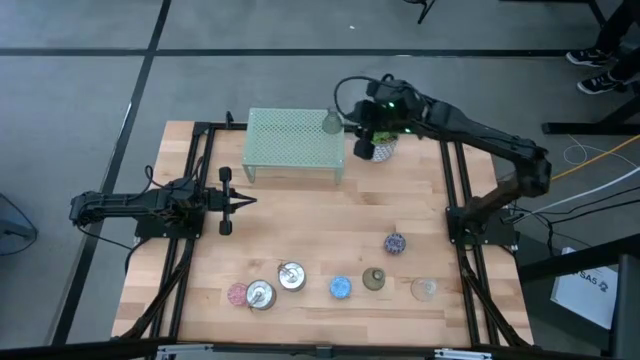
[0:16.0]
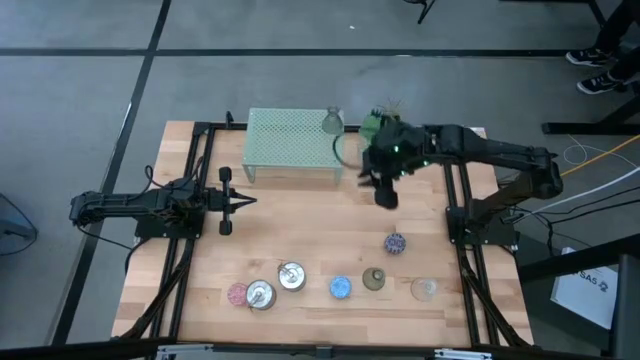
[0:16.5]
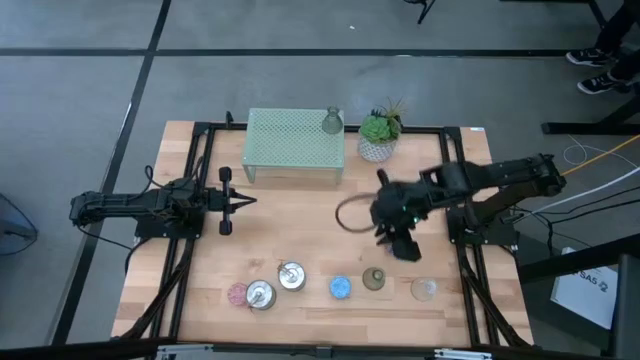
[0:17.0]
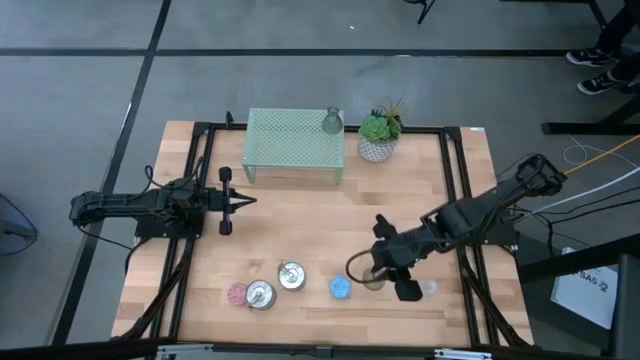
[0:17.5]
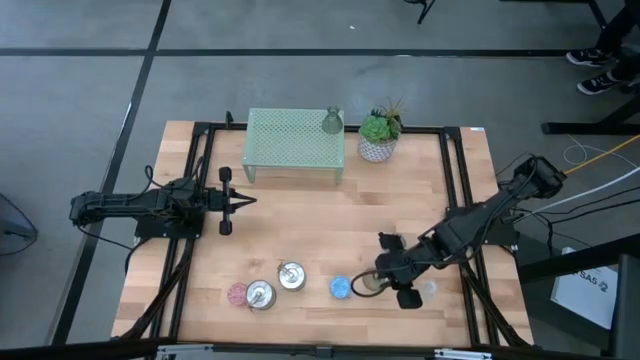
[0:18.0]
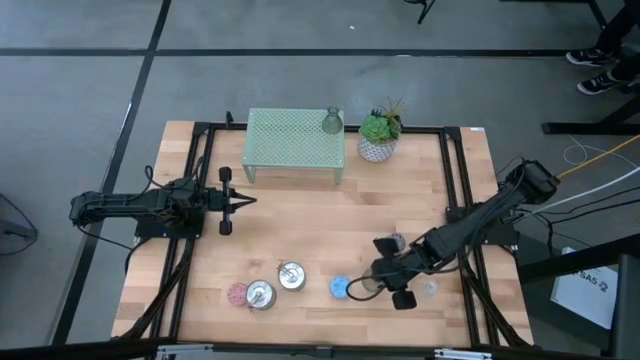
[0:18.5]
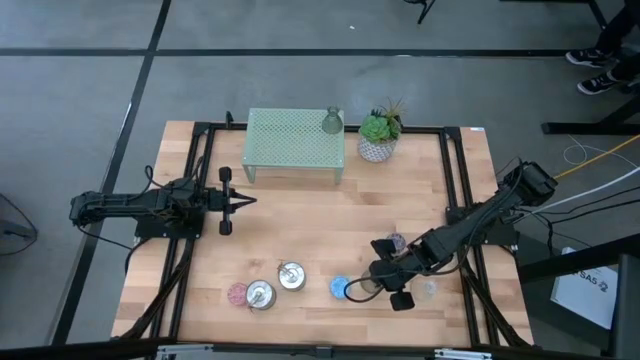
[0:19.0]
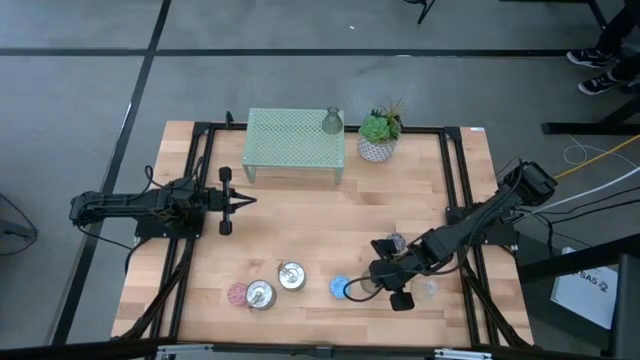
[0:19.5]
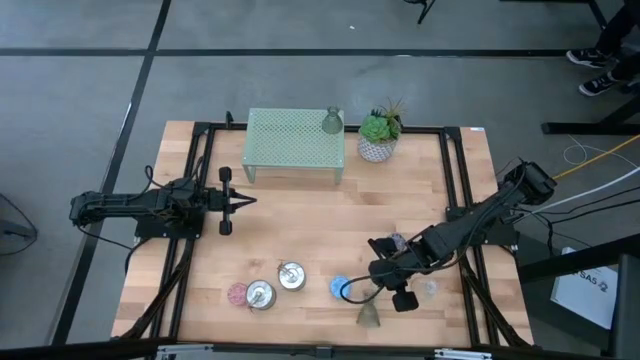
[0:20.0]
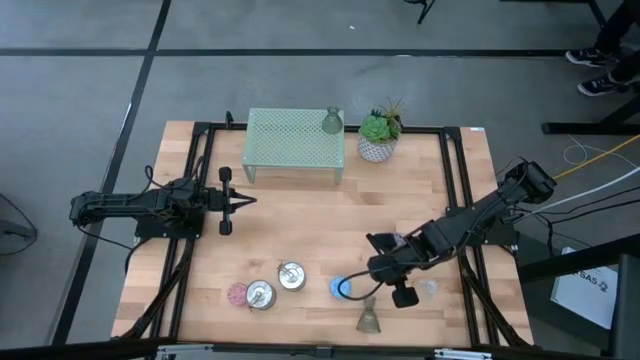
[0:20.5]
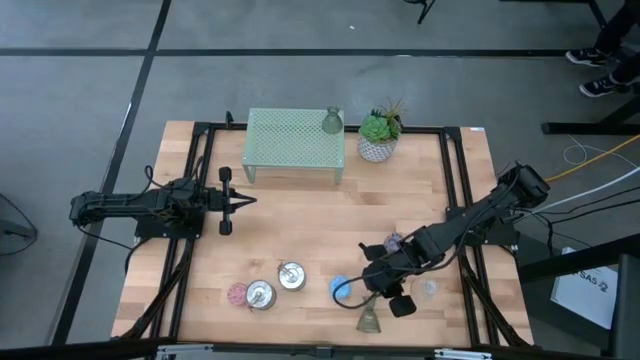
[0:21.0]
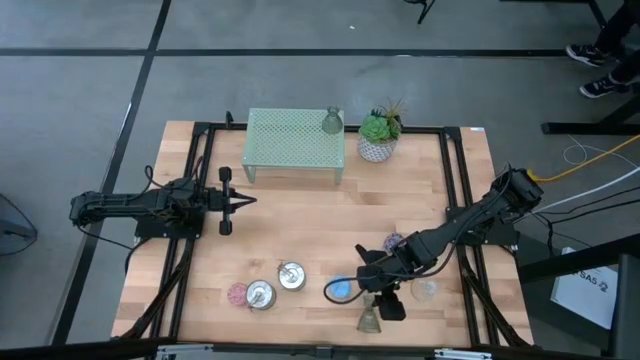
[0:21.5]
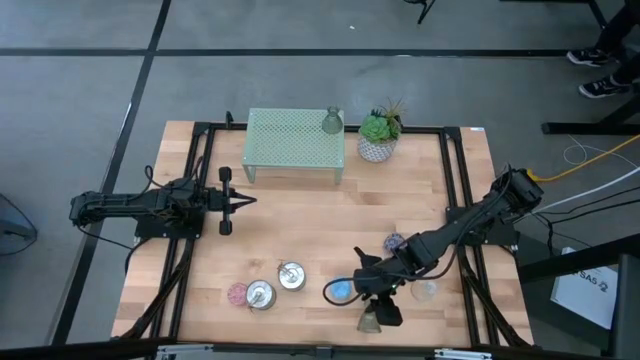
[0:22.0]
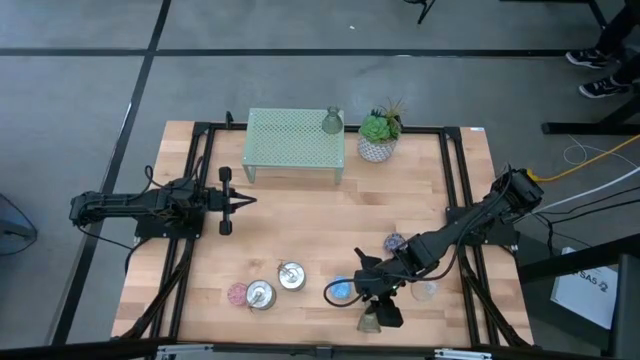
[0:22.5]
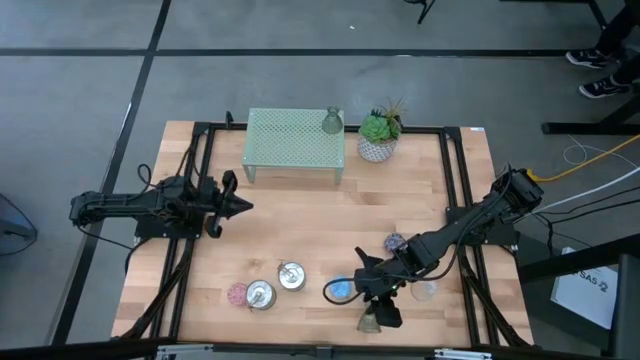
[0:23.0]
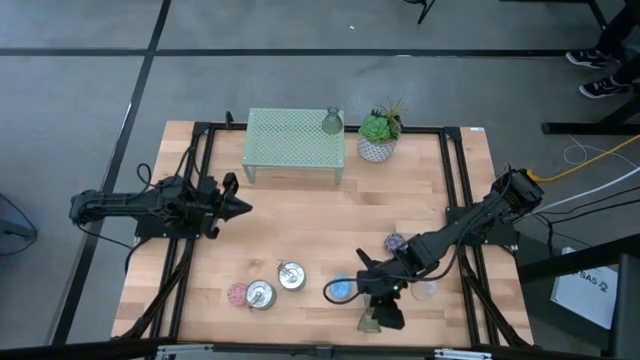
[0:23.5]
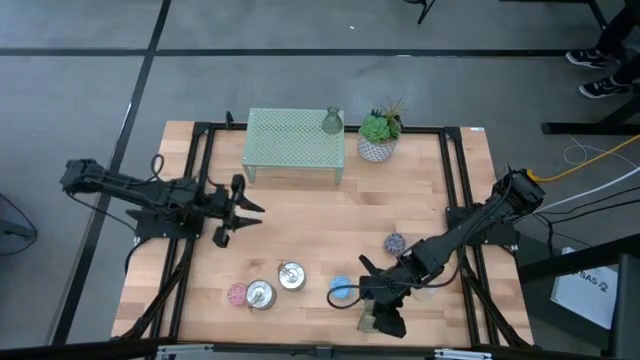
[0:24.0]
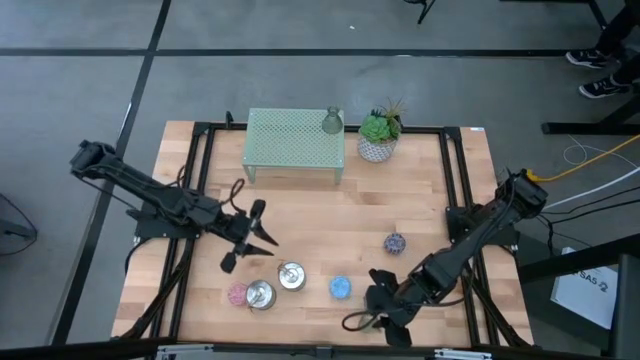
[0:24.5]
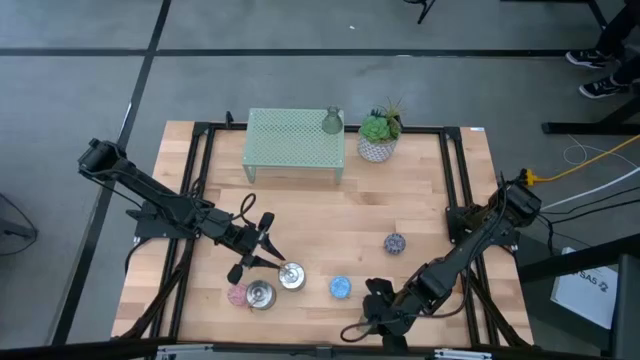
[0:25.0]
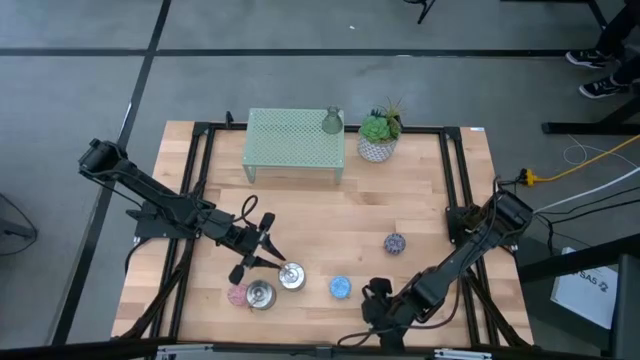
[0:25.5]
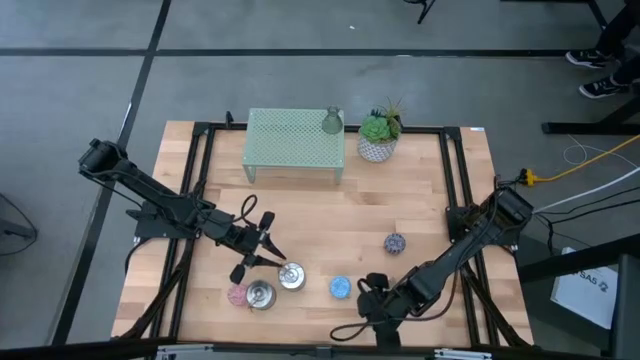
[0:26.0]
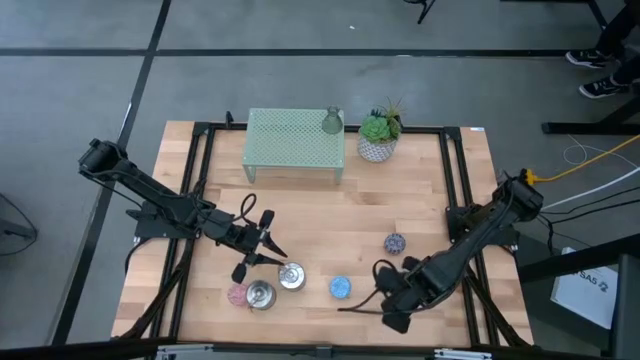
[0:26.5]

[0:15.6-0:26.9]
Task: Pick & Place candle stick holders
Put the green glass candle holder on the shelf

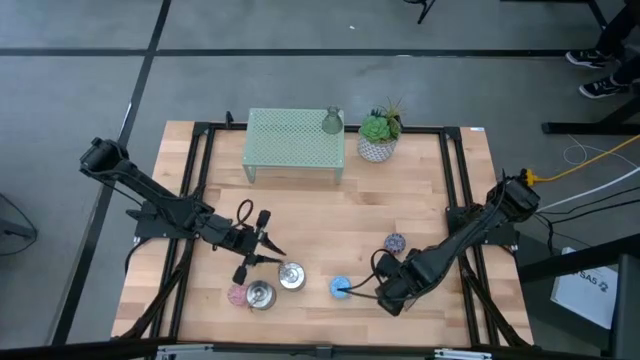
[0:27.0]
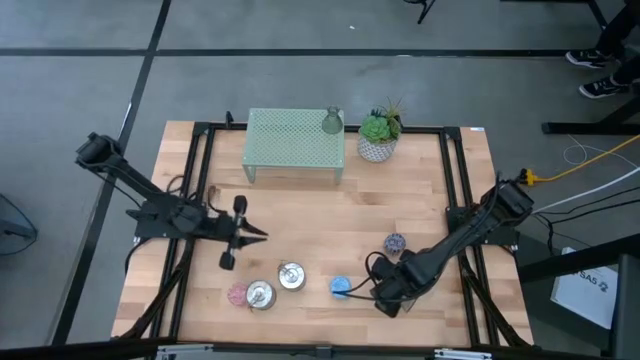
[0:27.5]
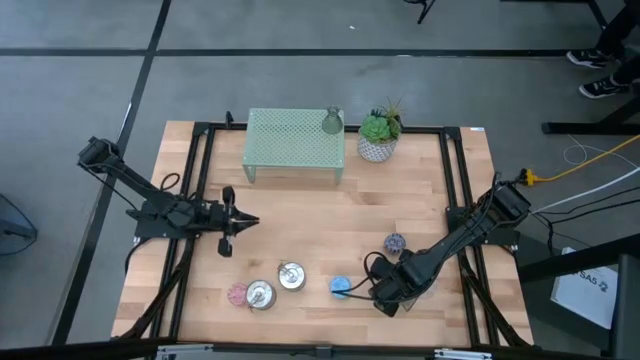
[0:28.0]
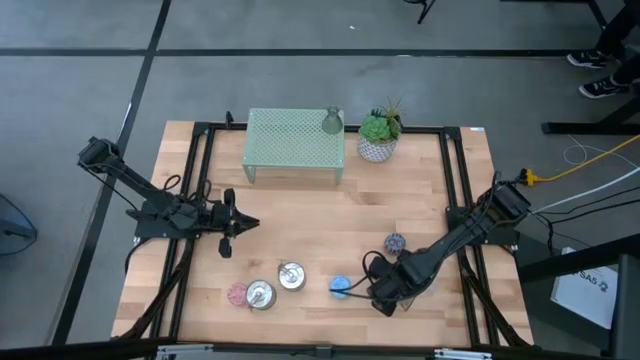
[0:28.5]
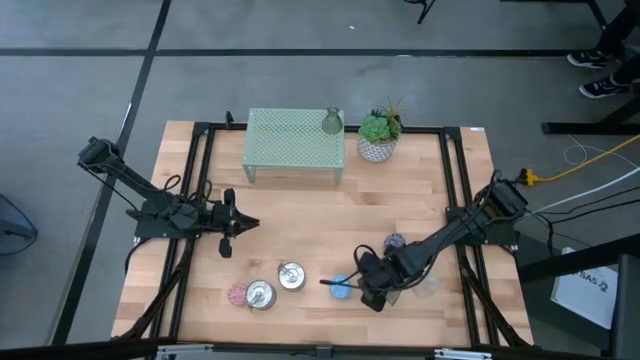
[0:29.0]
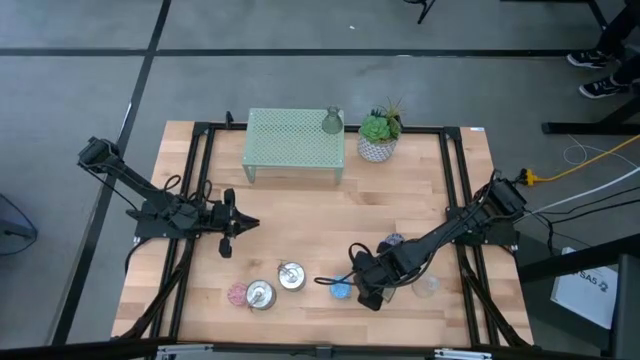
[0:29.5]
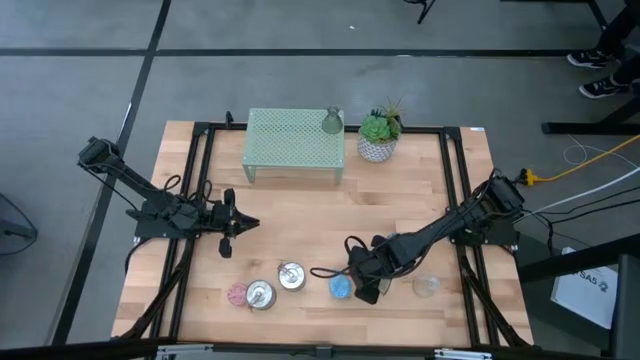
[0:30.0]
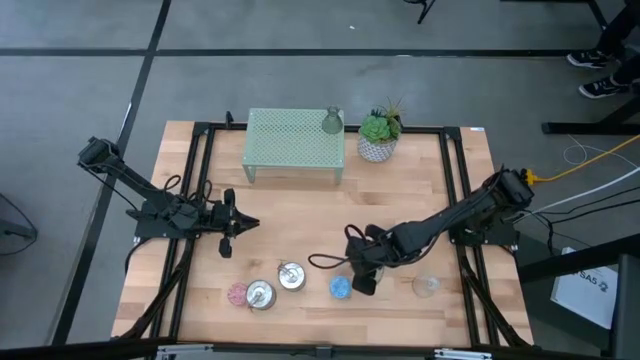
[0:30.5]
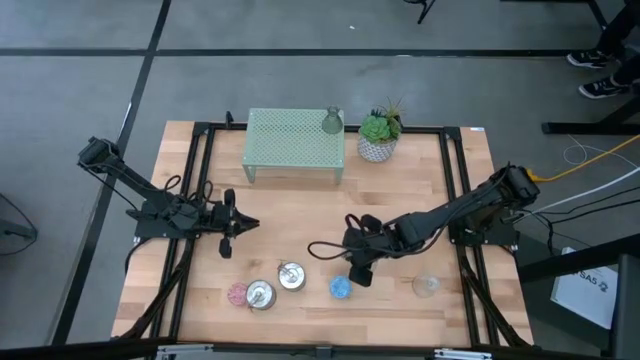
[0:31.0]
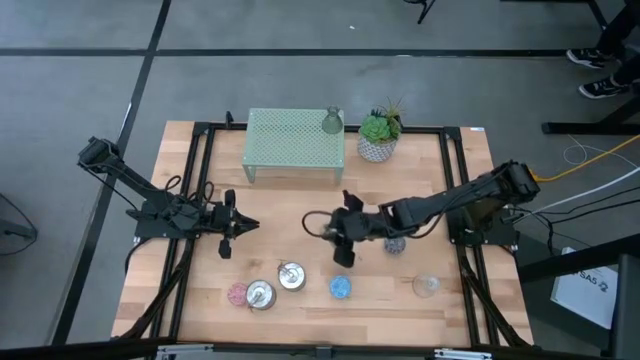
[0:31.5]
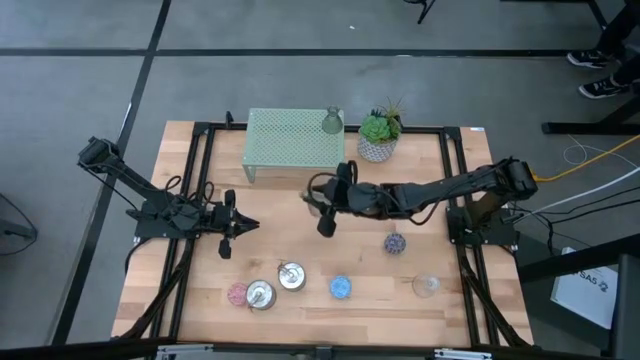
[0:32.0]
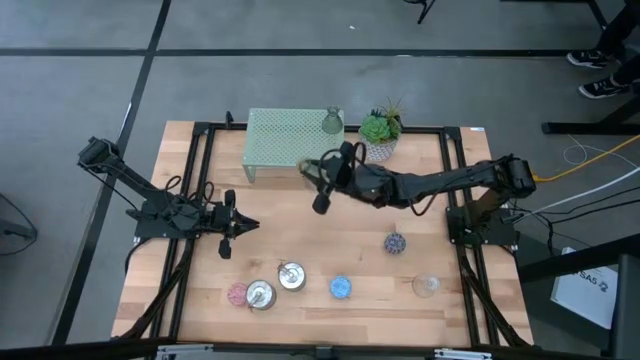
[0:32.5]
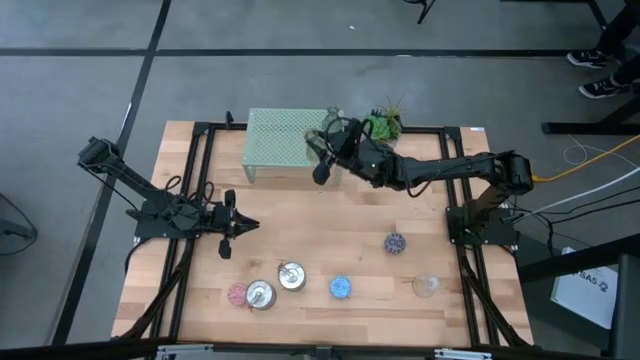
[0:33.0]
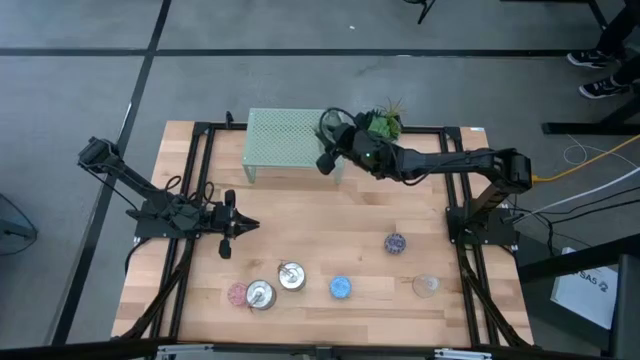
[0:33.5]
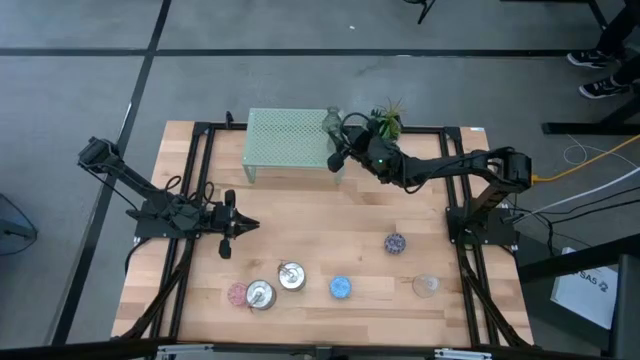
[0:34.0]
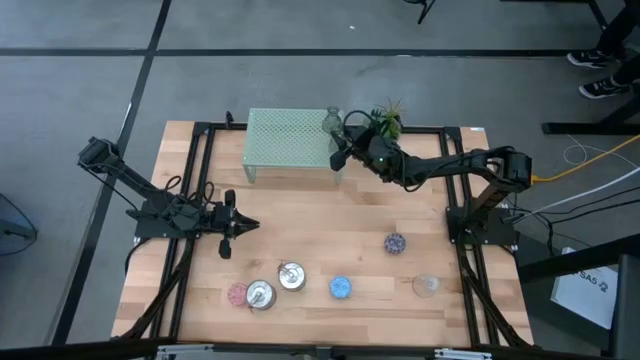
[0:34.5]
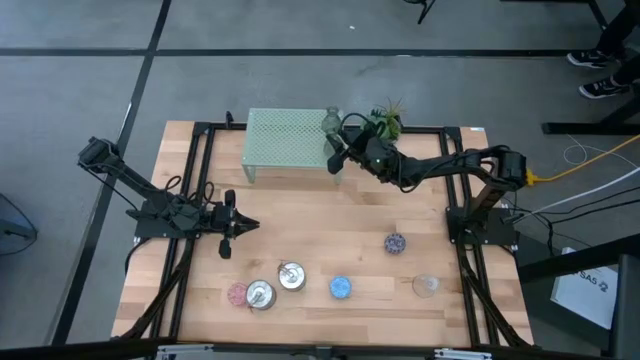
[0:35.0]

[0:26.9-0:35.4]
Put the green glass candle holder on the shelf

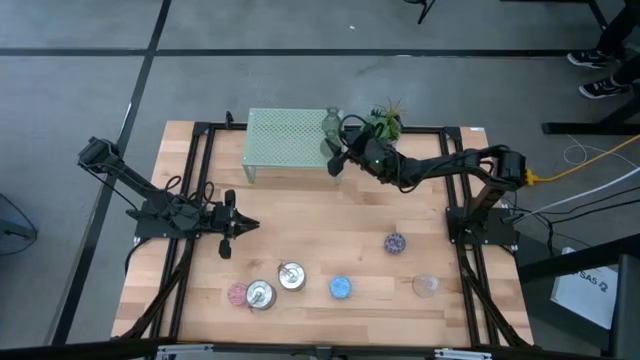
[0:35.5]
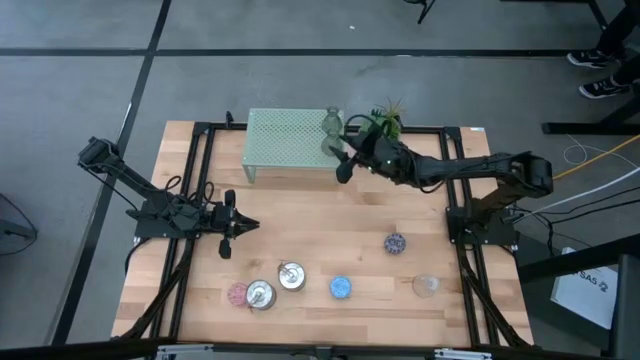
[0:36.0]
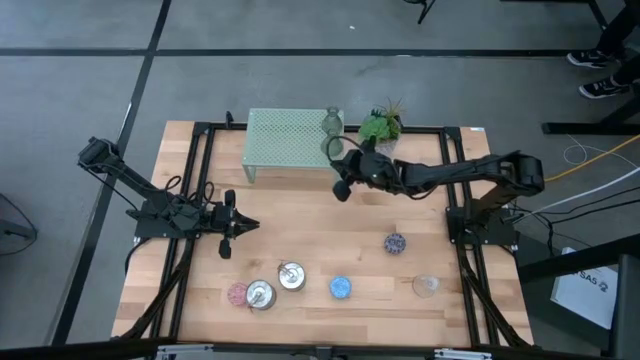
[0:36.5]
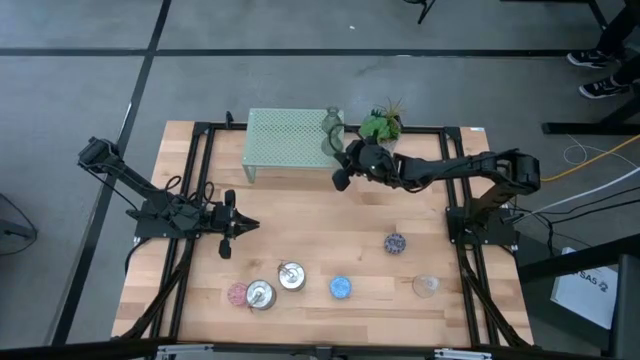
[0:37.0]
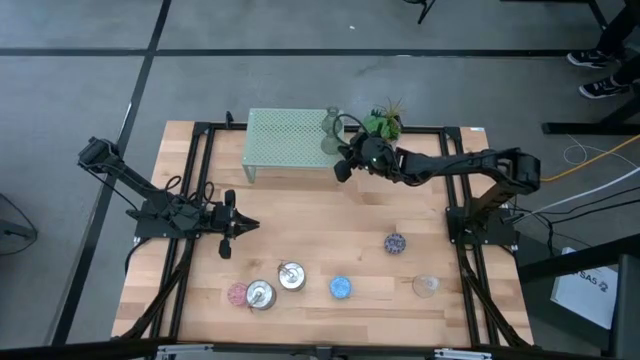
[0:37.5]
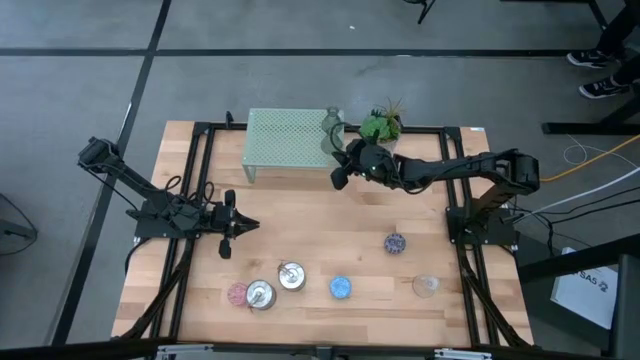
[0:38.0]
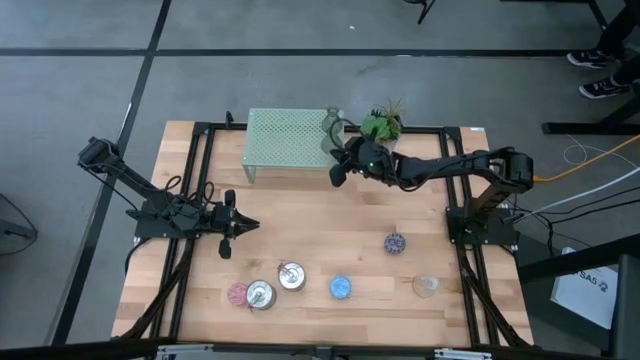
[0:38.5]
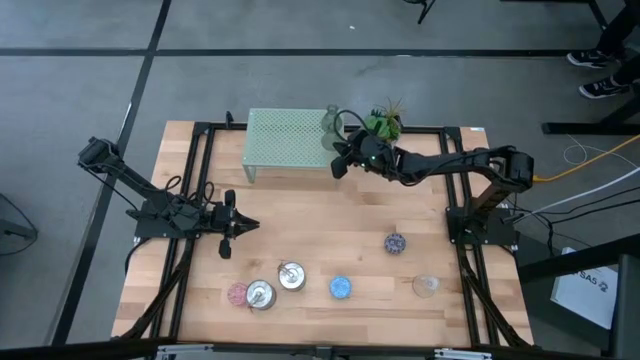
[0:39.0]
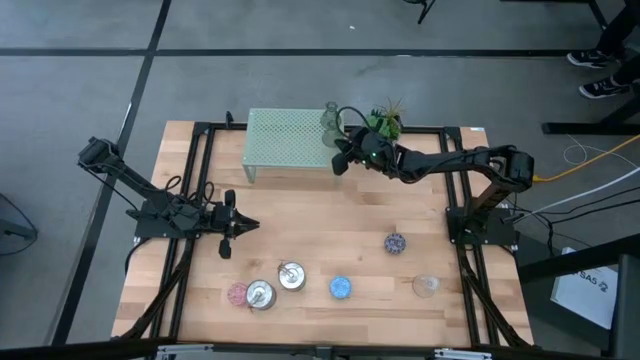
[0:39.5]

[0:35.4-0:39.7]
Adjust the green glass candle holder on the shelf
